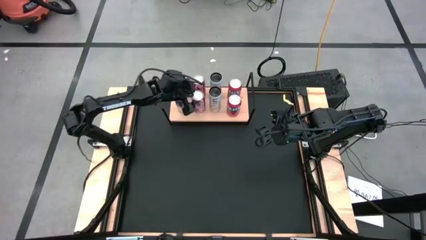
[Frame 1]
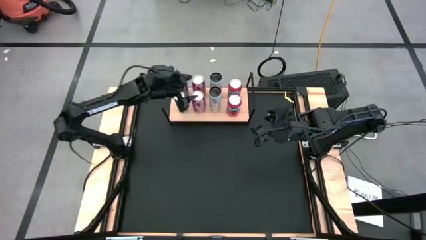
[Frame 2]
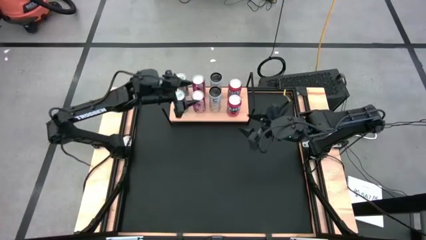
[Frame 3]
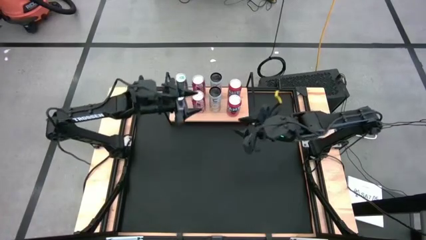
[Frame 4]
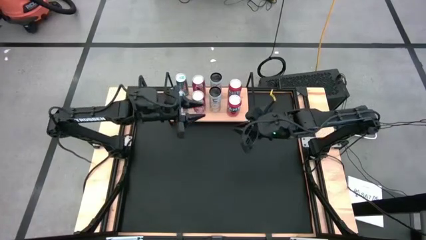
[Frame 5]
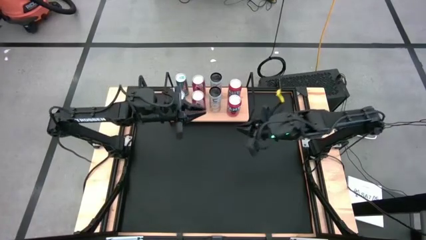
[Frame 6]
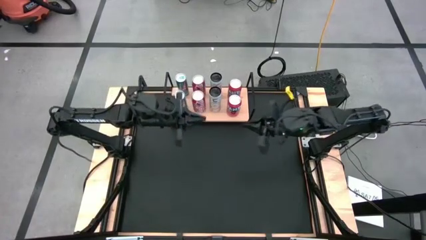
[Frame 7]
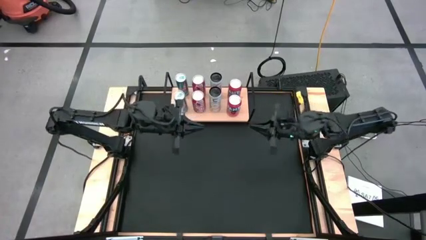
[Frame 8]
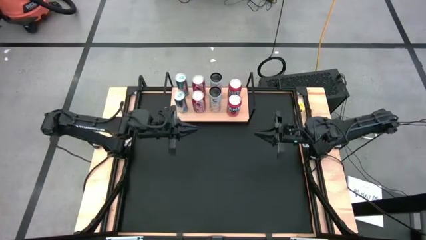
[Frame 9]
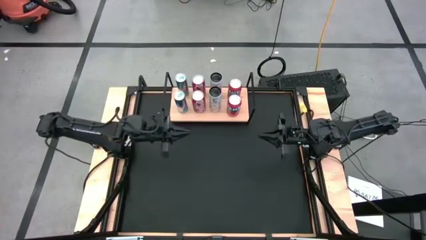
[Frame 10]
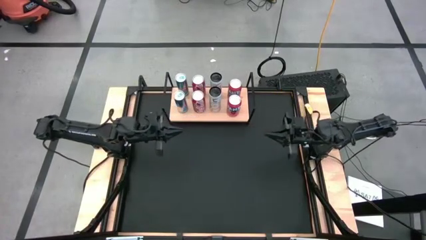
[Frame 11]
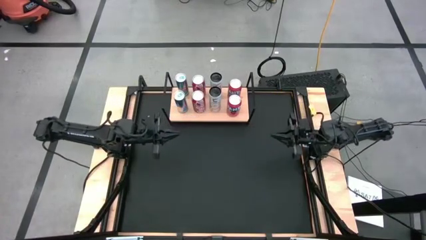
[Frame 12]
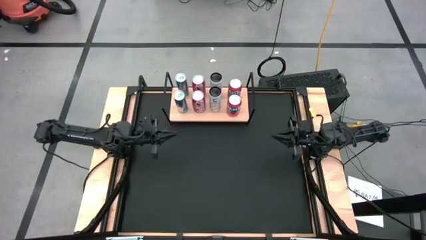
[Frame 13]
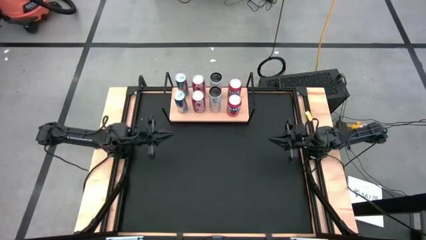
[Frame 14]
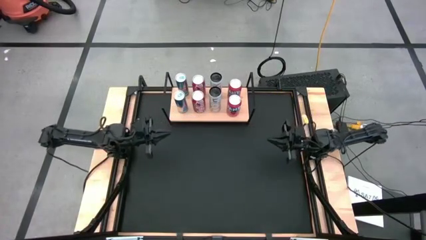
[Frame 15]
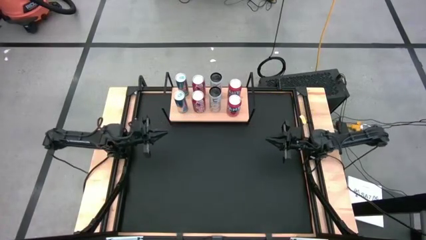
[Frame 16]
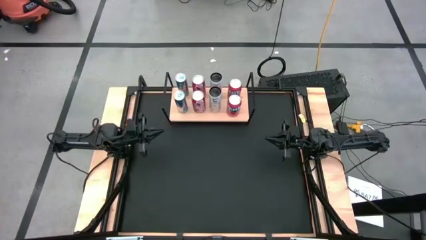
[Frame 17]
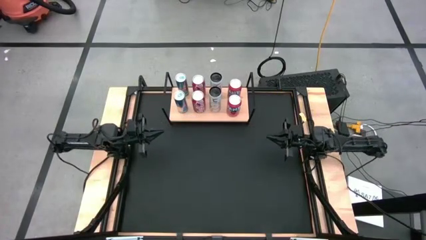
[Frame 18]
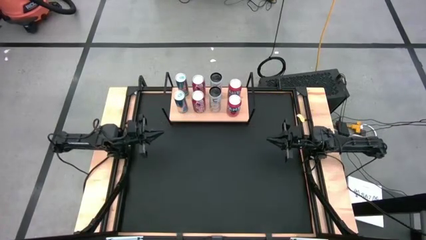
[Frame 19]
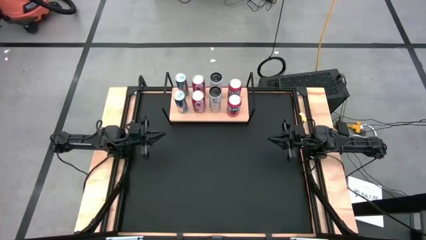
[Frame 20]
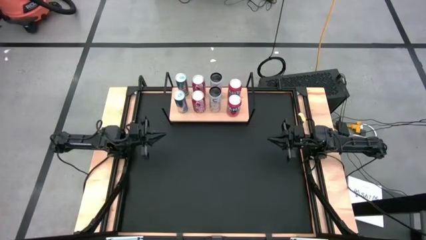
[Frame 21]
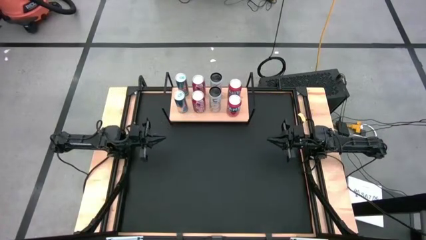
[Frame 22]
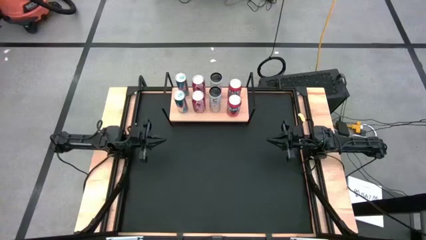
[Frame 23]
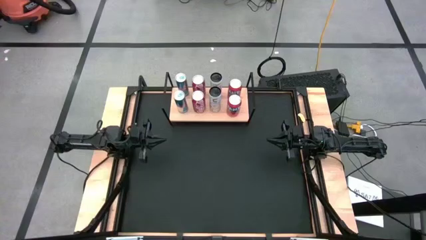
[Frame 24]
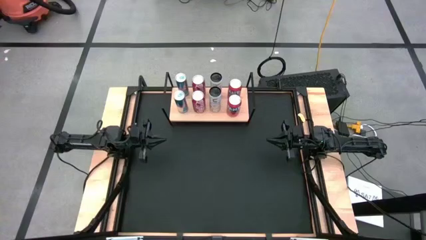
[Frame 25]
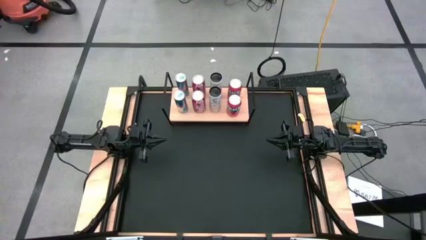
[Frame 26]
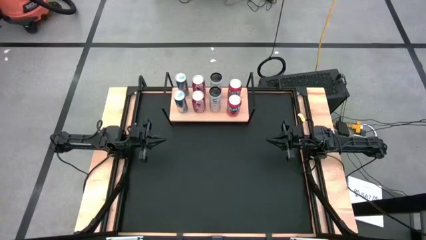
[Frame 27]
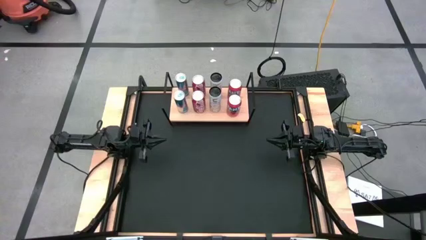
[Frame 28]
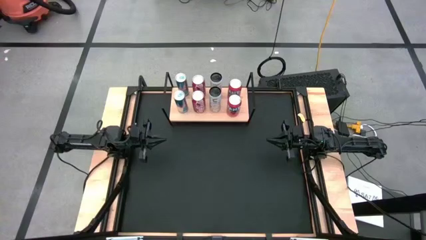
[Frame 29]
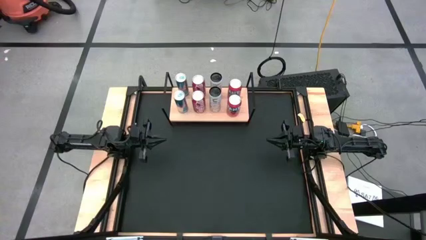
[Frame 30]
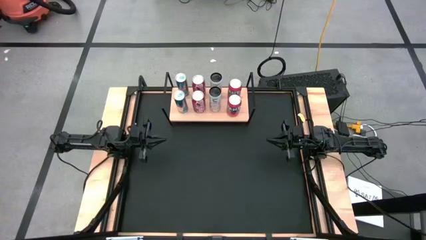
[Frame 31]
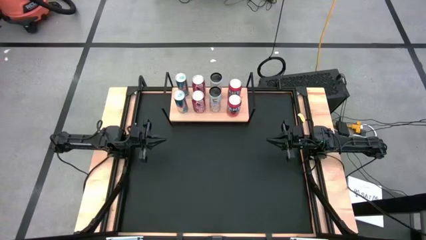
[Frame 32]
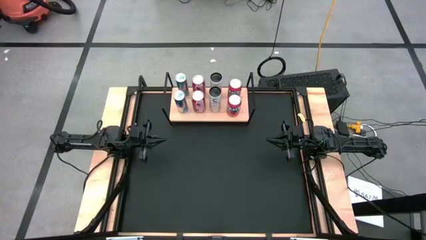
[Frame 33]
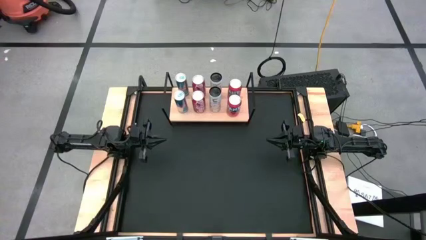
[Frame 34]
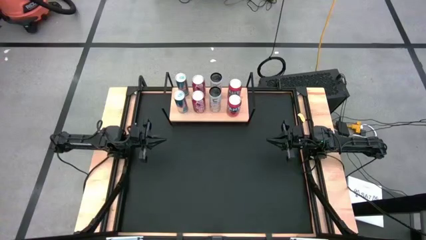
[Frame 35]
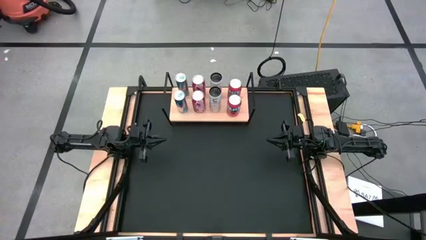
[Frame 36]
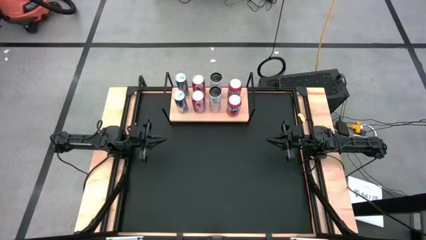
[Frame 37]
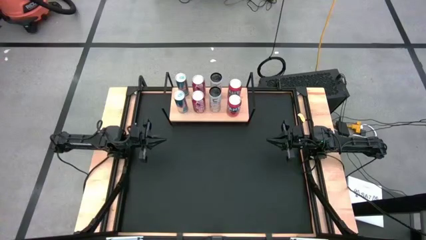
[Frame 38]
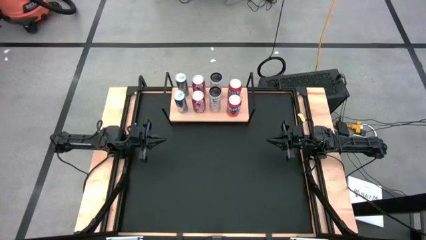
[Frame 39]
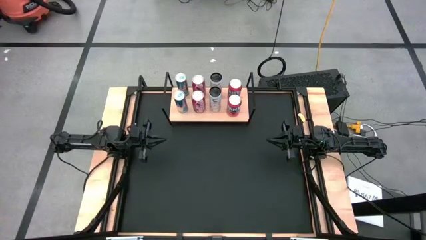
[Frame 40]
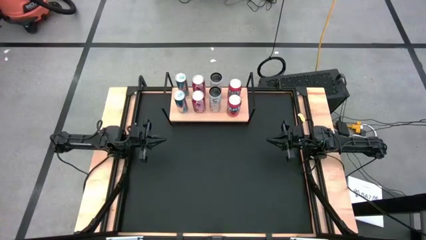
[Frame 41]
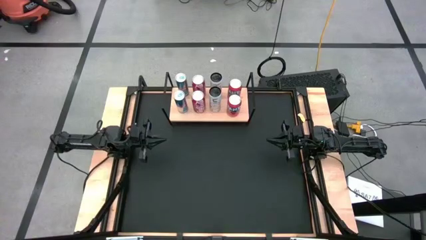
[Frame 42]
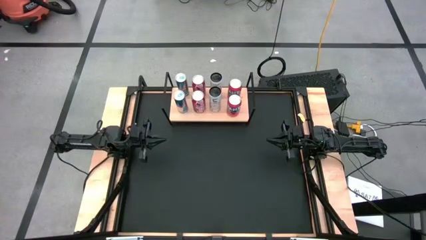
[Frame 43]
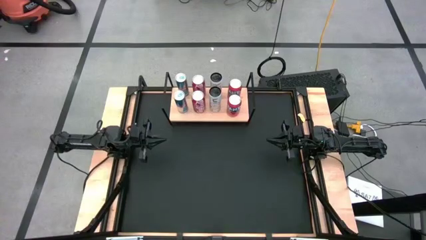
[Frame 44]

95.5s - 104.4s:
Task: Place canned beverage on shelf
Return to Home Position

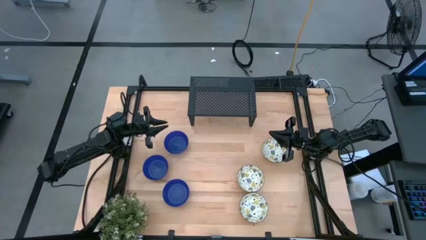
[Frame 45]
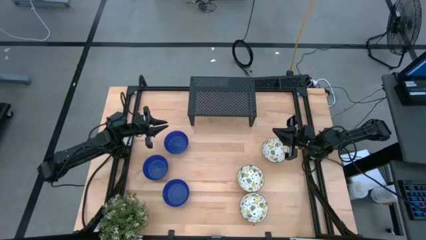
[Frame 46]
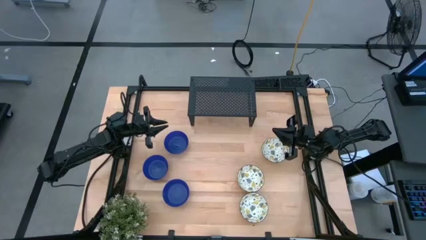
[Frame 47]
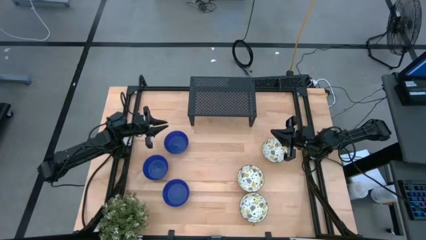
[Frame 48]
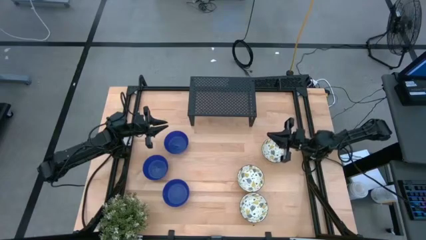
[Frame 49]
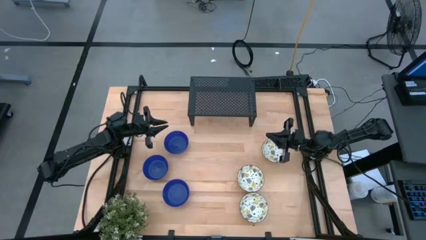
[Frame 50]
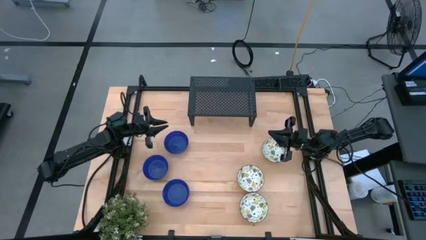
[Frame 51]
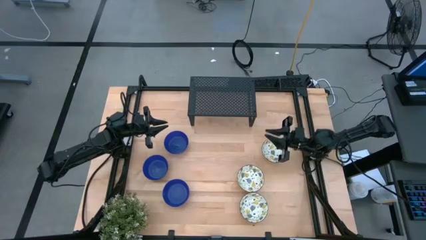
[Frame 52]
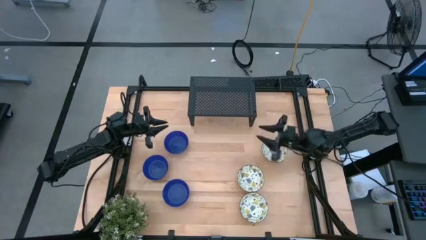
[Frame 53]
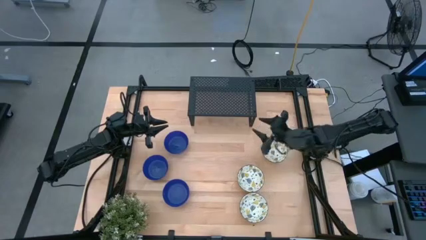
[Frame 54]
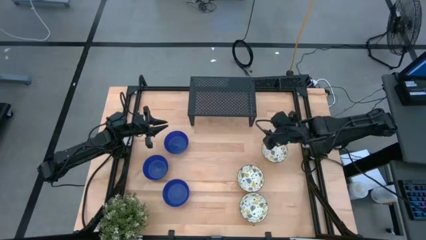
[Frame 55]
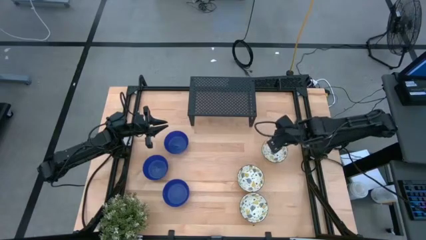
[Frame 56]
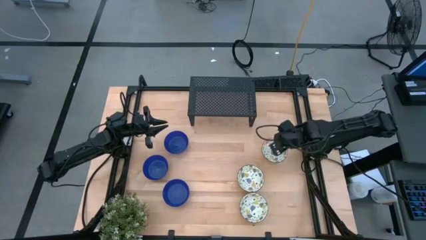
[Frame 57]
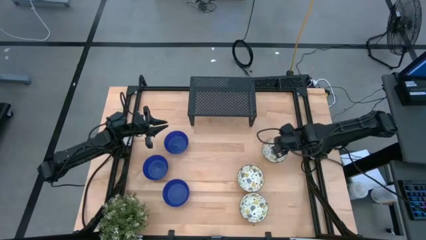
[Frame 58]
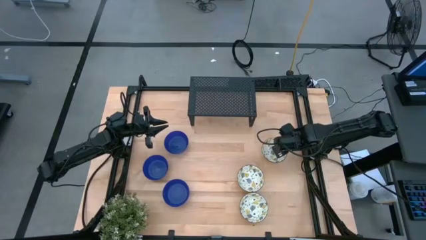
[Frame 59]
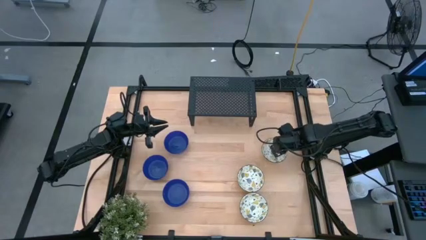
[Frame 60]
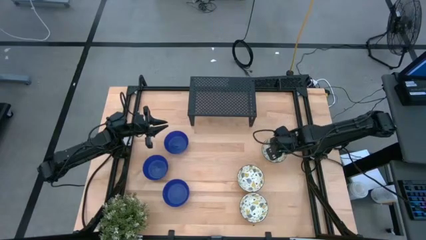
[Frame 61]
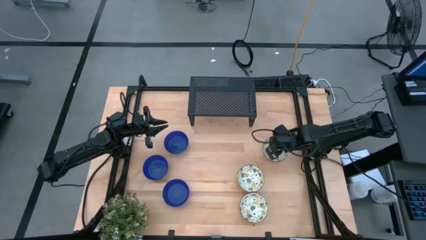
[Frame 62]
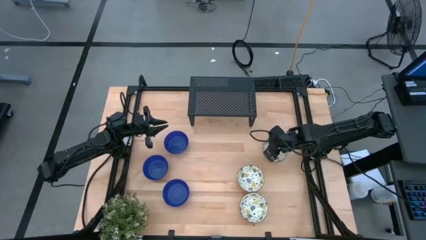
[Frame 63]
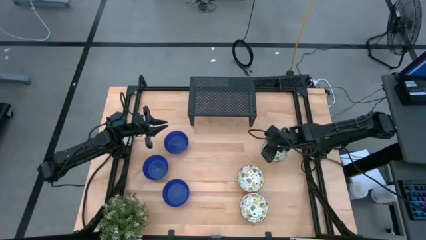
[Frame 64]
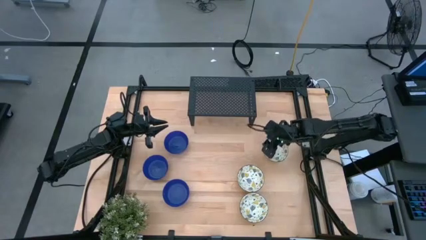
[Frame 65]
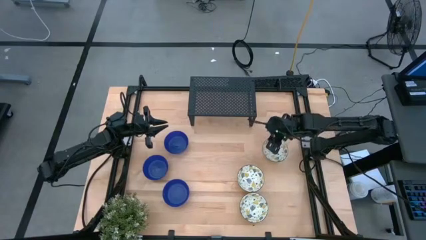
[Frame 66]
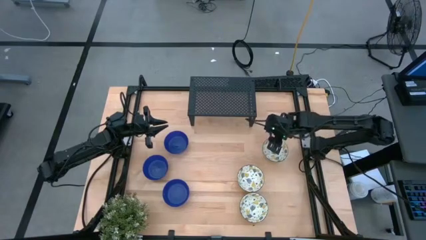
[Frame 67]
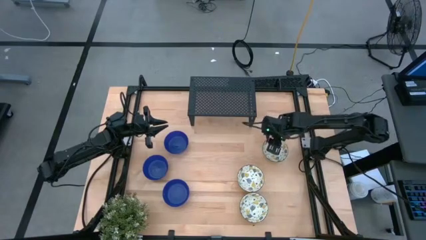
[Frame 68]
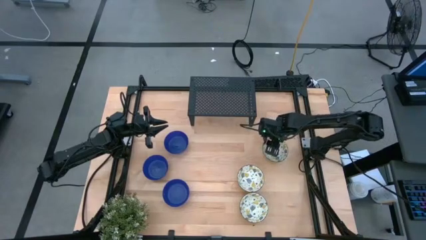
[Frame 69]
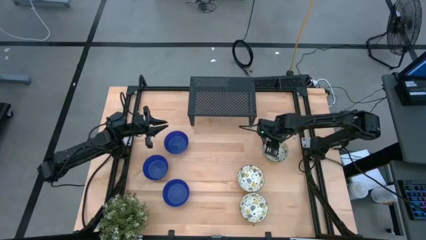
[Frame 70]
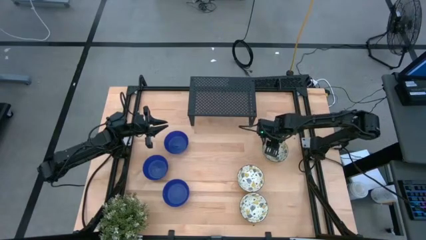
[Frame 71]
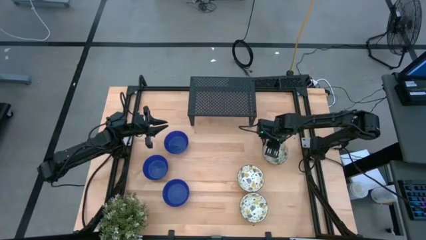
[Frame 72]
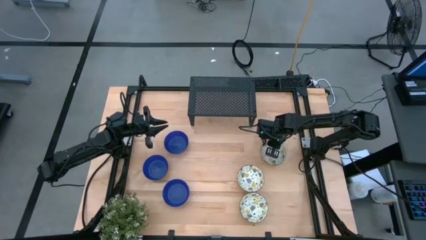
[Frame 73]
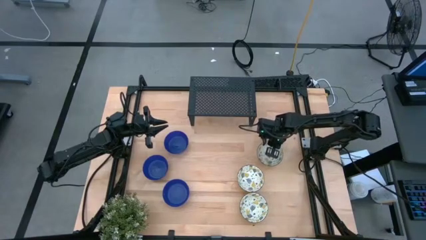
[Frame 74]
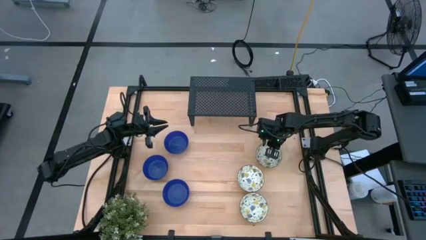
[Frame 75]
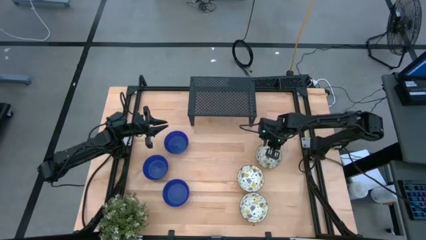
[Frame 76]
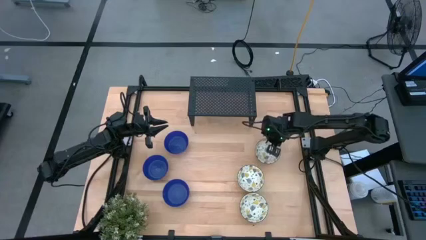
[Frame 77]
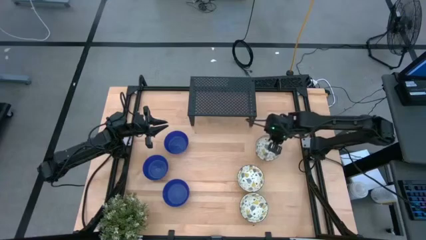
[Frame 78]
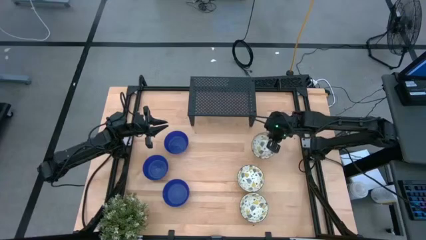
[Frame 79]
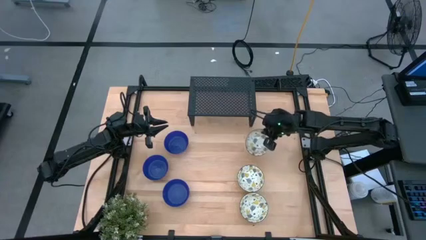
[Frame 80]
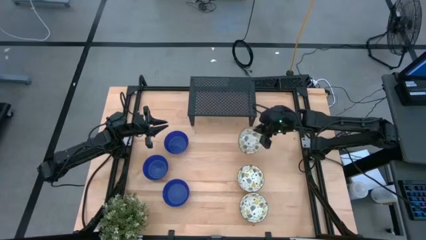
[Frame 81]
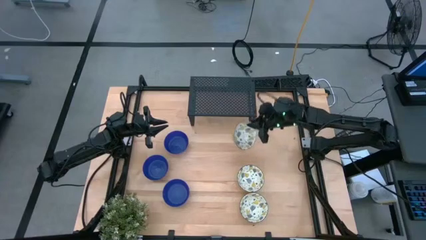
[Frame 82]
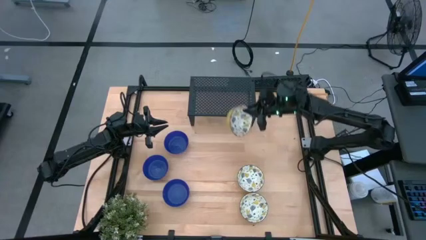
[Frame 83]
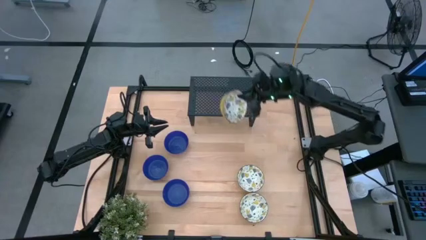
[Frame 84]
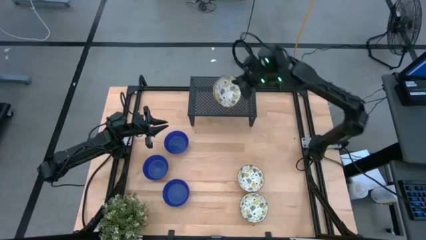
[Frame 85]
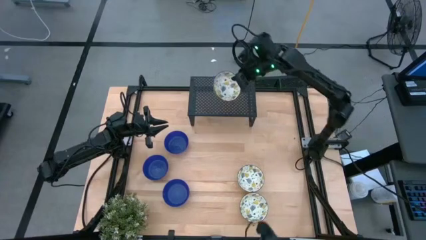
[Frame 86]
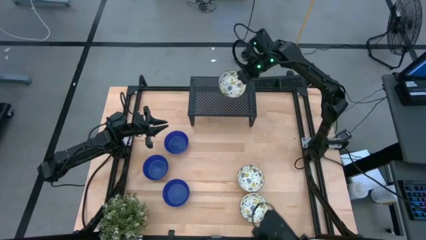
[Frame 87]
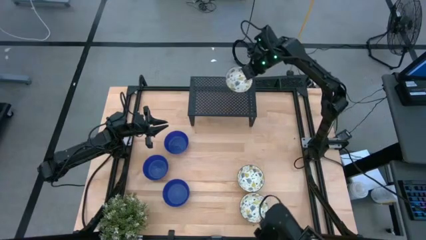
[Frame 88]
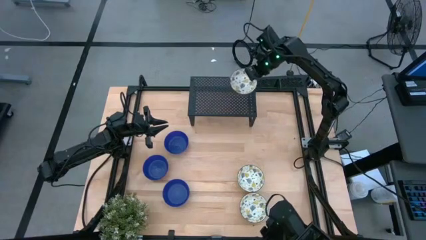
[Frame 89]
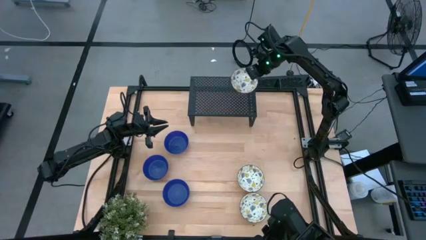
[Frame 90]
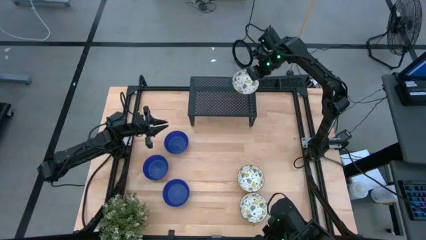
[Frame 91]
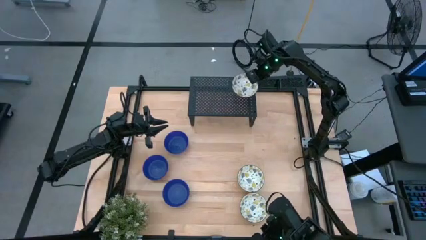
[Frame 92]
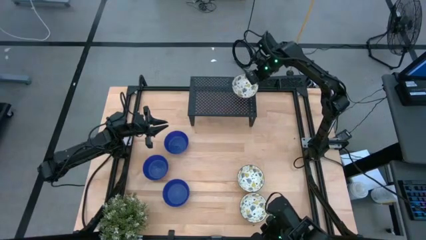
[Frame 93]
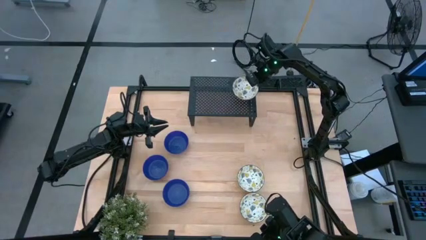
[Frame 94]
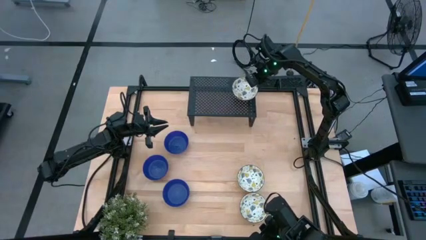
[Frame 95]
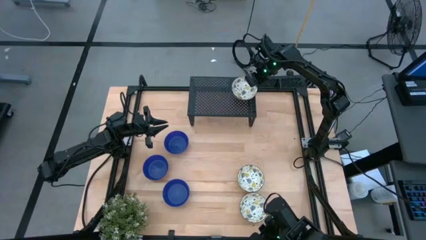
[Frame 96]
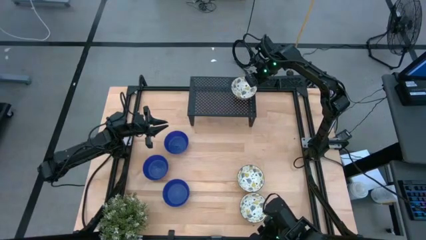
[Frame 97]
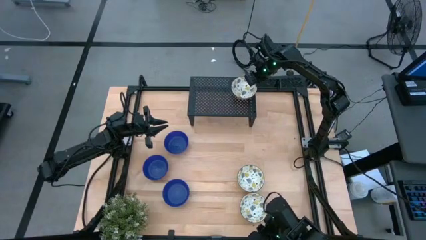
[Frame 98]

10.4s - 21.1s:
Task: Pick & Place Mini bowls
Put the top white patterned bowl on the shelf
